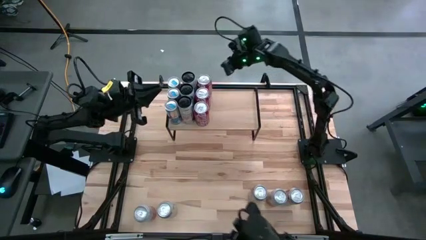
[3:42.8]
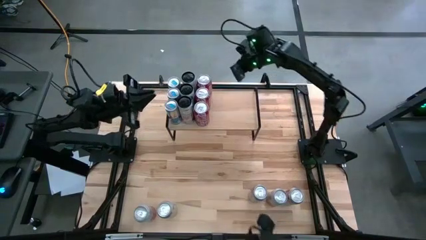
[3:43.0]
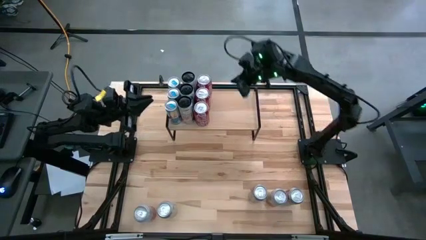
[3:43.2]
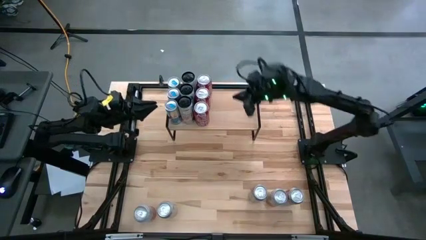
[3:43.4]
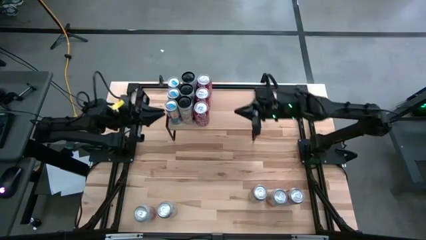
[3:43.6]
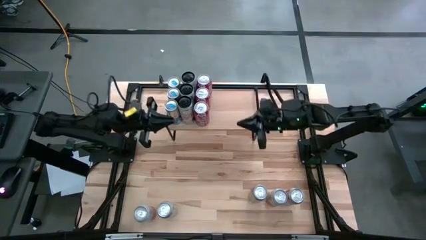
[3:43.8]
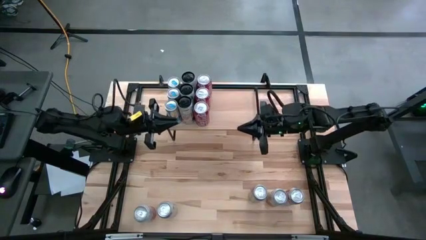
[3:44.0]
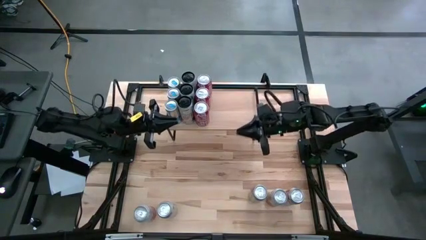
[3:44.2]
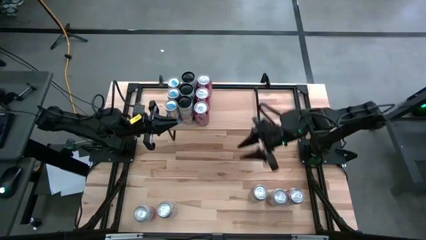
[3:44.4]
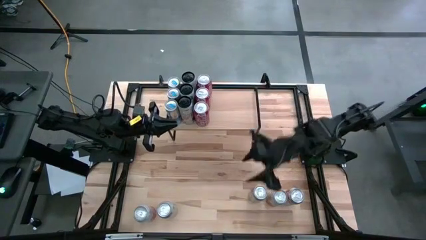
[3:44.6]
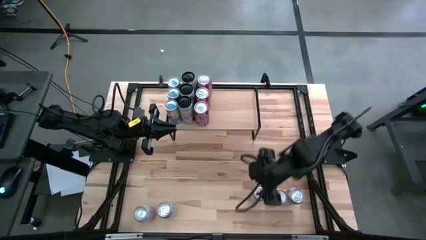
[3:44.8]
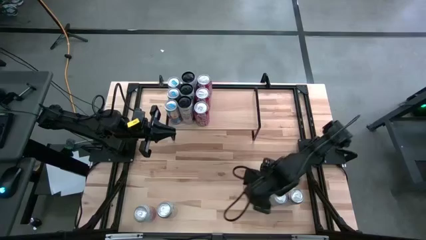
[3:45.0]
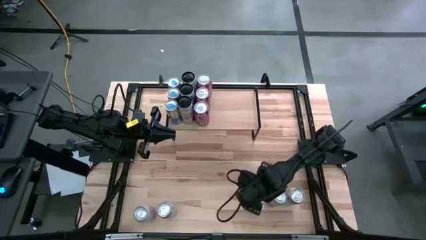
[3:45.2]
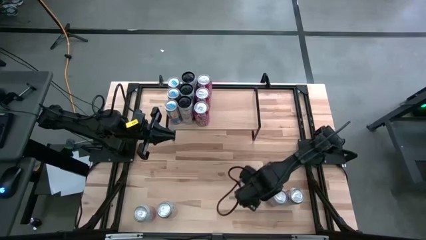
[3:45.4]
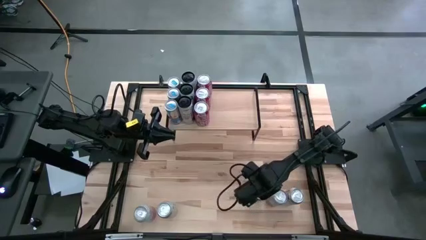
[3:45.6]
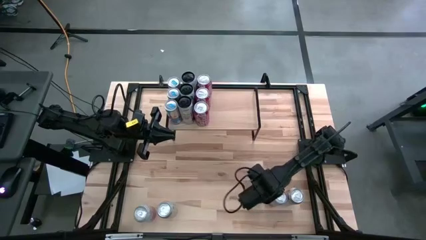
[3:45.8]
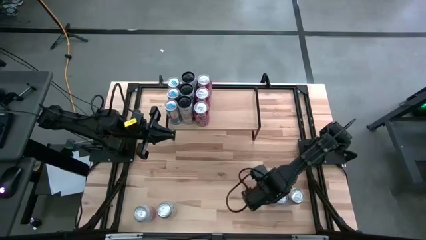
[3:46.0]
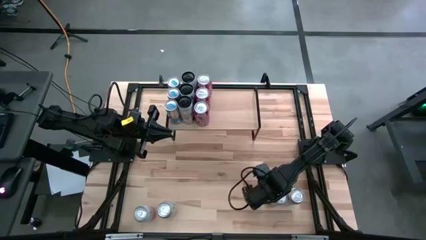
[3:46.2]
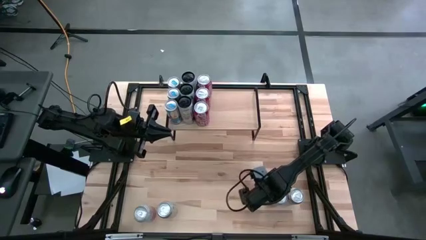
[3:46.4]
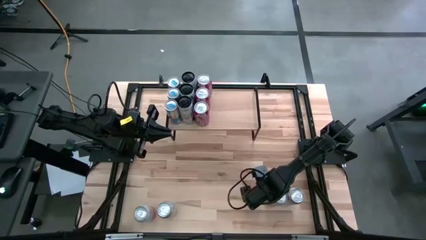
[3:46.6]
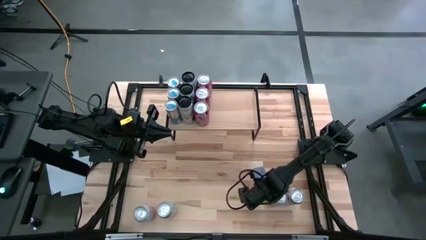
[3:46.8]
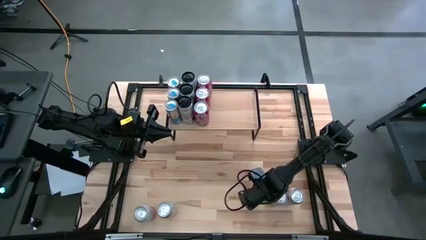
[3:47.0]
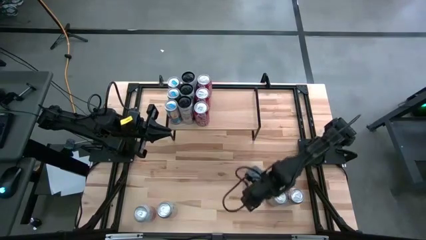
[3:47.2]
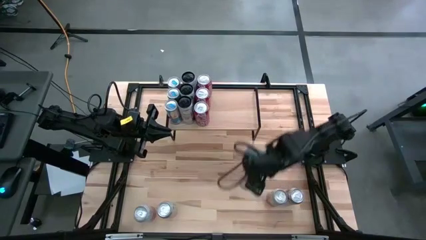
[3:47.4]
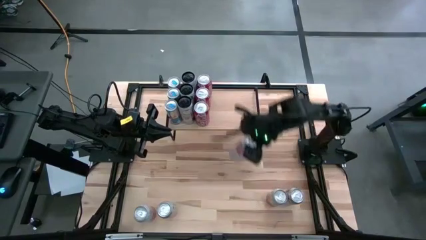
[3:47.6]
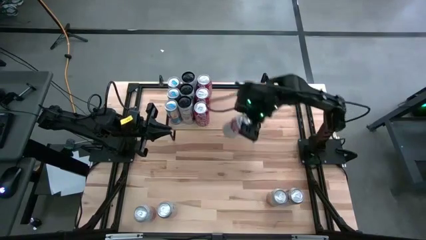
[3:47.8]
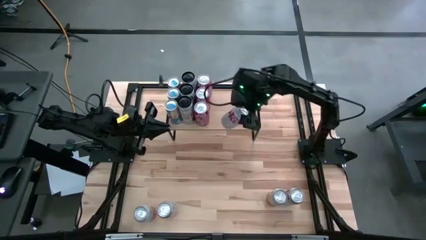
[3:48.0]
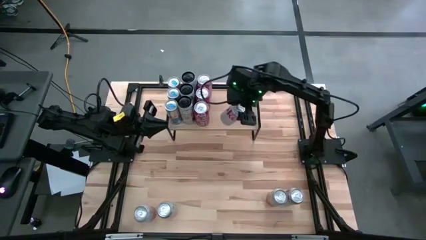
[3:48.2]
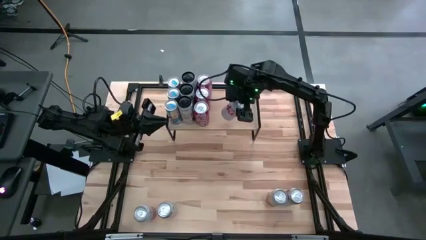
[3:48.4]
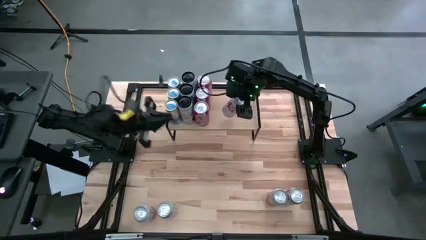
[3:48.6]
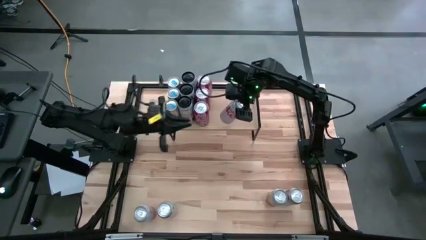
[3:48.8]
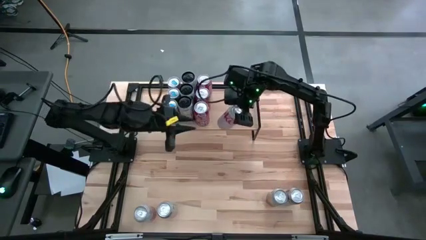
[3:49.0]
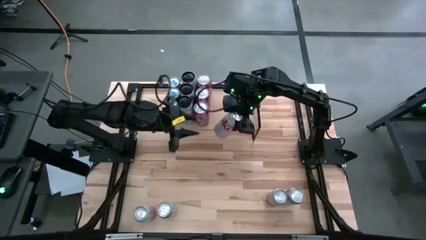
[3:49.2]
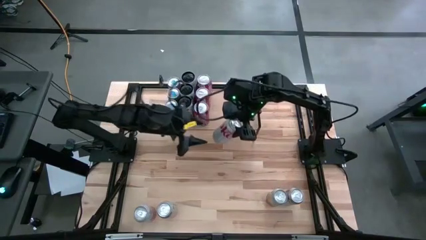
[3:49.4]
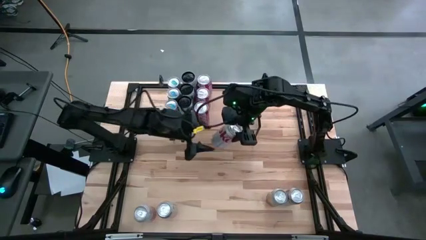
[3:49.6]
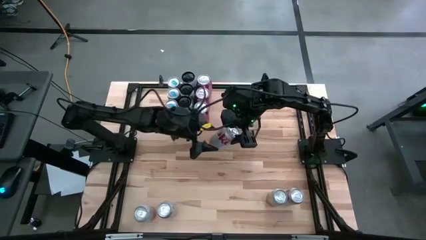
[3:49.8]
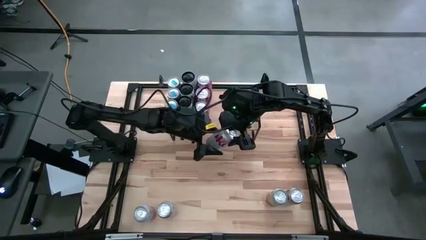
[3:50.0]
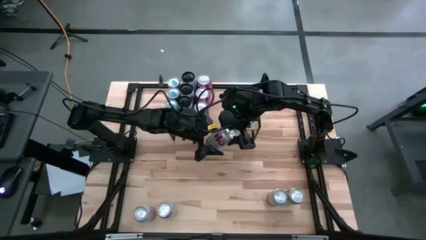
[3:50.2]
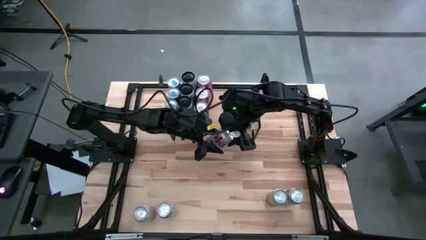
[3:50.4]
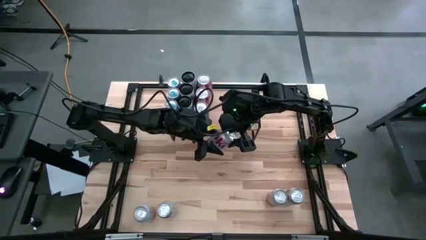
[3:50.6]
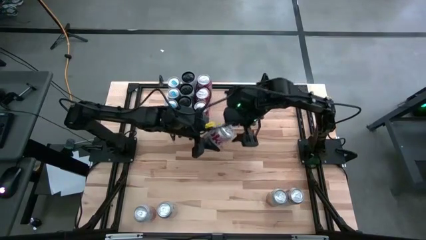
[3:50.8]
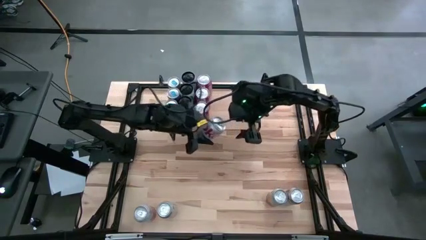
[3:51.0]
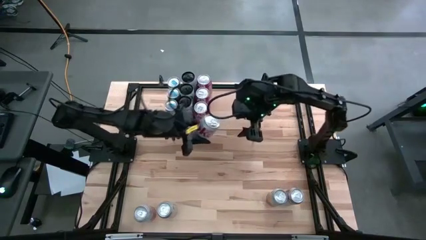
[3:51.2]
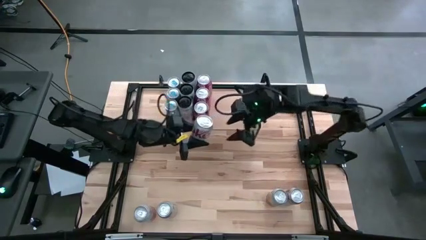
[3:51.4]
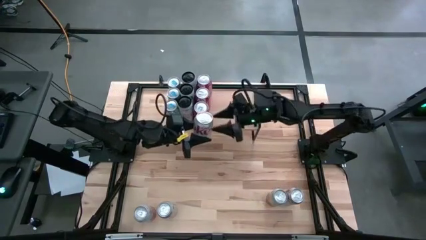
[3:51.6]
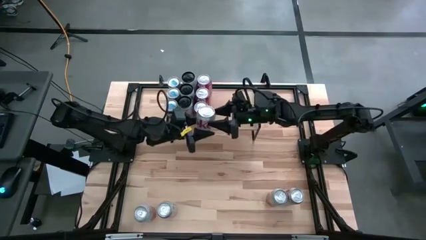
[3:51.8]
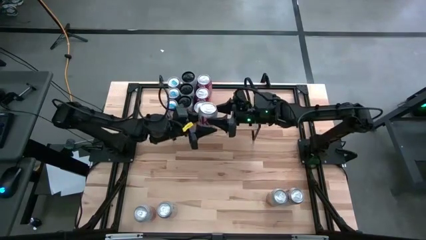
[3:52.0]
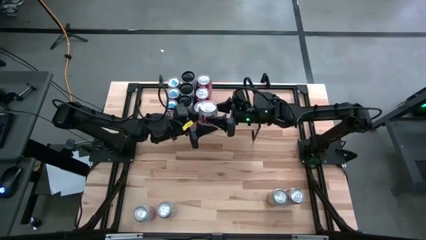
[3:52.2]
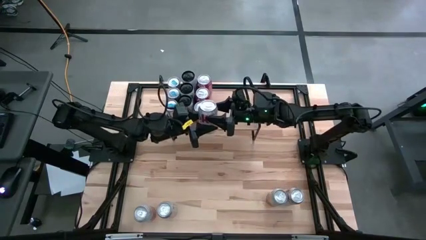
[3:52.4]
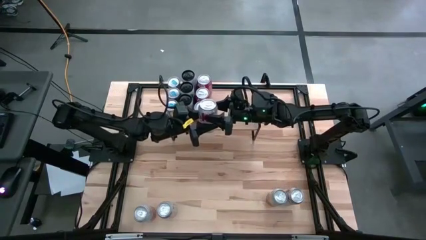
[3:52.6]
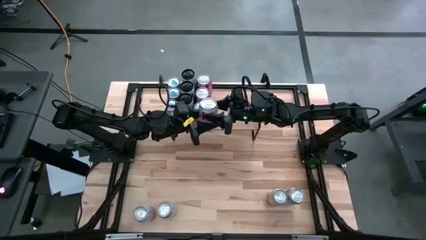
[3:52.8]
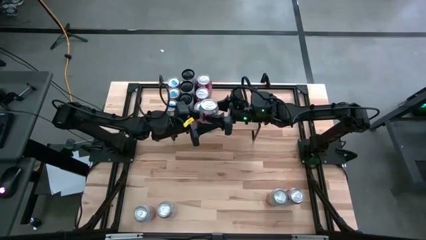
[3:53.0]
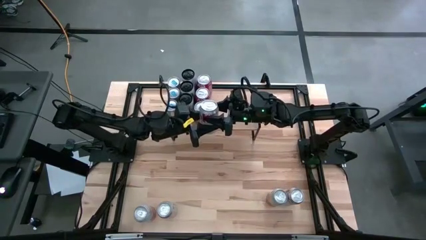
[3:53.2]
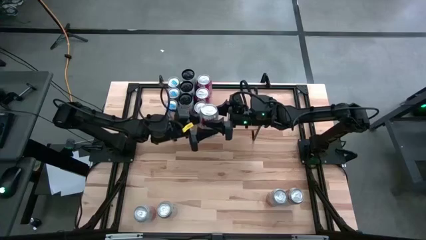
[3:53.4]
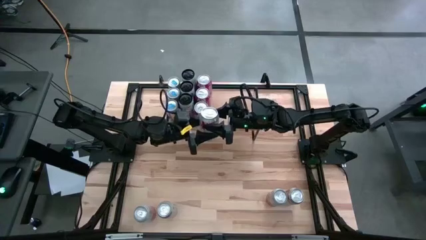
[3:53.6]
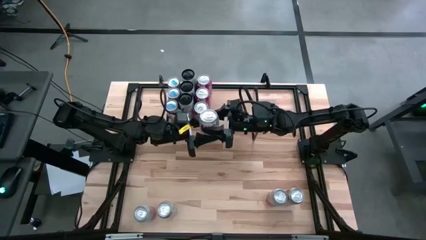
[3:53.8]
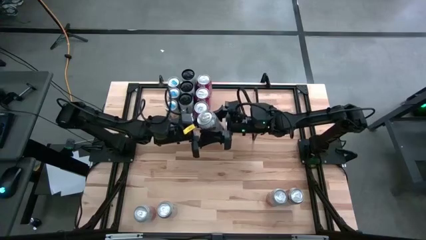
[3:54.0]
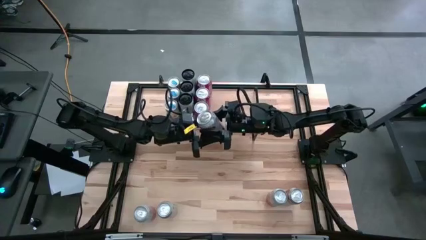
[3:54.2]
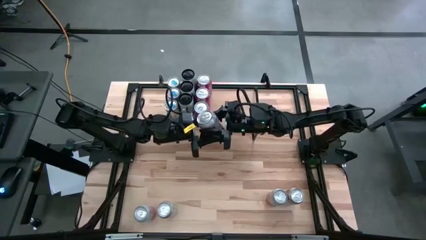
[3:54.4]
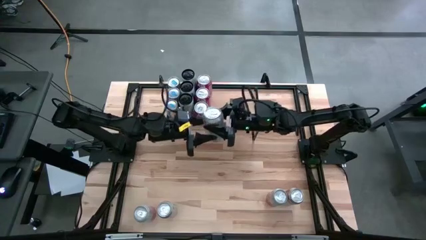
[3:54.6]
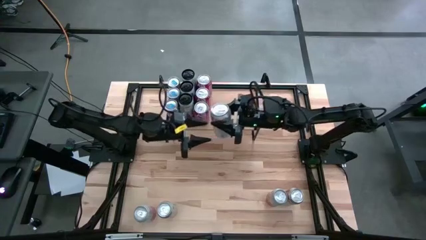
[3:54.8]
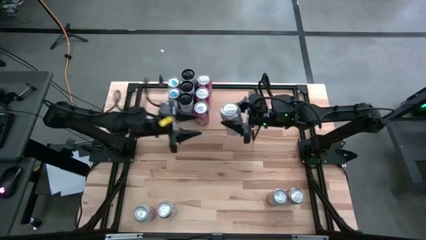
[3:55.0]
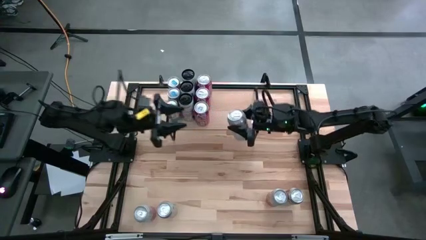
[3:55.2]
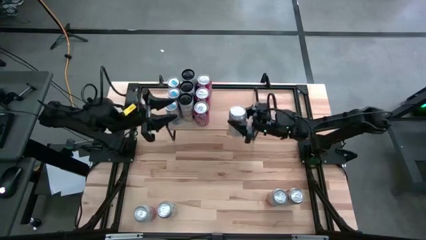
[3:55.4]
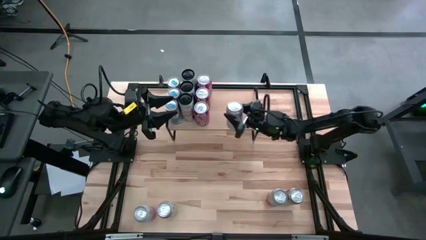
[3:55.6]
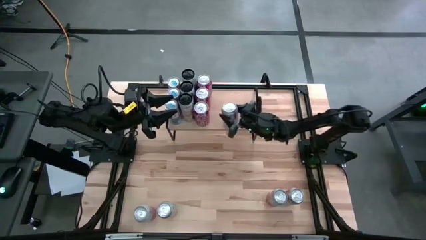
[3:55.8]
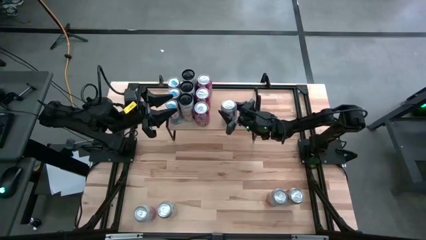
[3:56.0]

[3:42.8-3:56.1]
Task: Place canned beverage on shelf
Put the middle red-silver soda can on the shelf

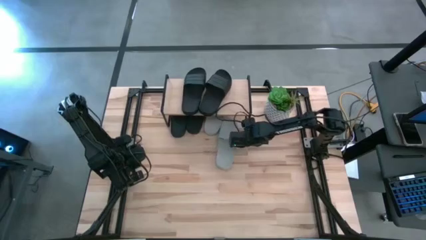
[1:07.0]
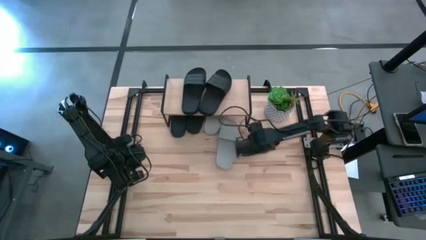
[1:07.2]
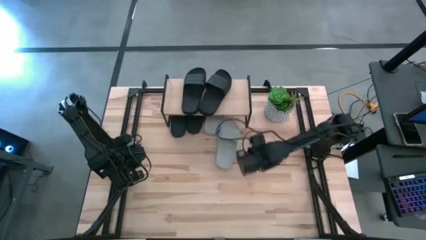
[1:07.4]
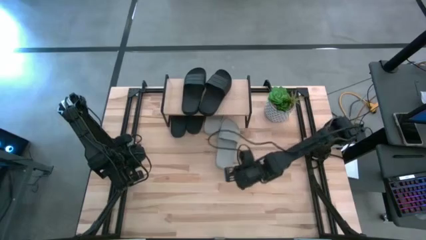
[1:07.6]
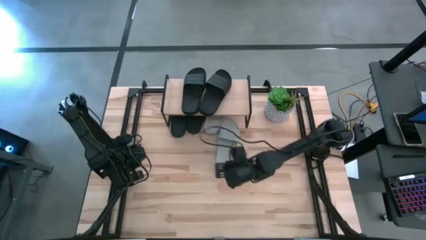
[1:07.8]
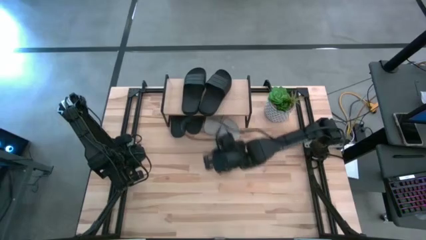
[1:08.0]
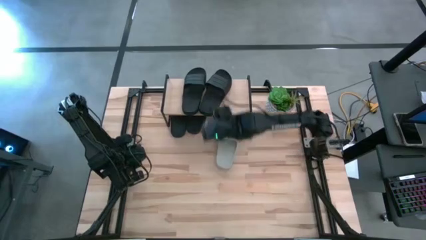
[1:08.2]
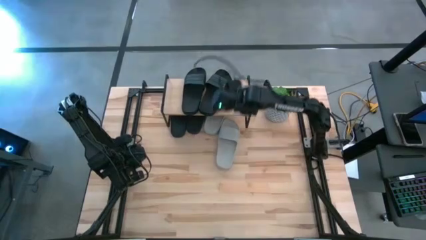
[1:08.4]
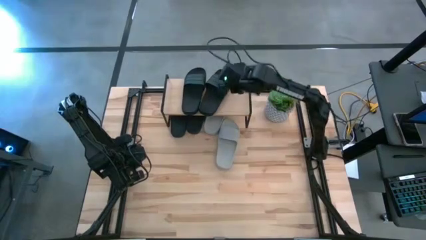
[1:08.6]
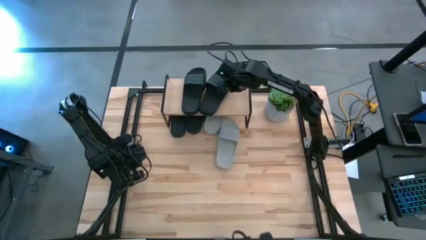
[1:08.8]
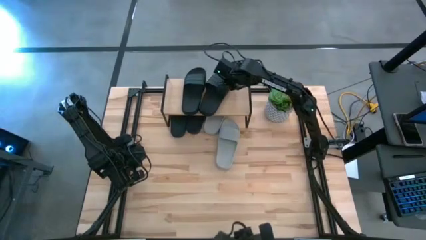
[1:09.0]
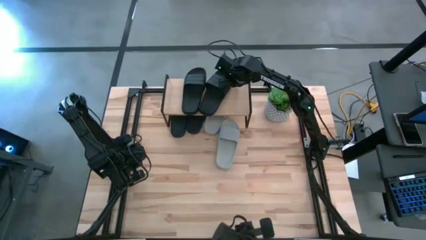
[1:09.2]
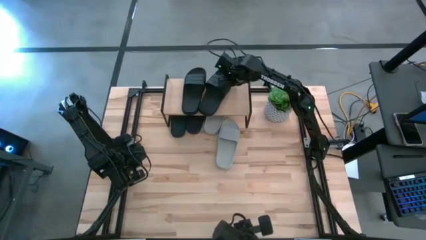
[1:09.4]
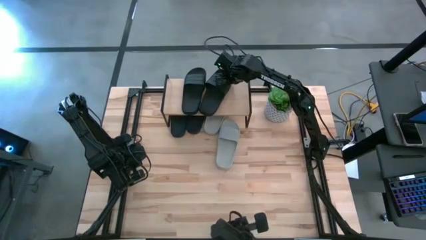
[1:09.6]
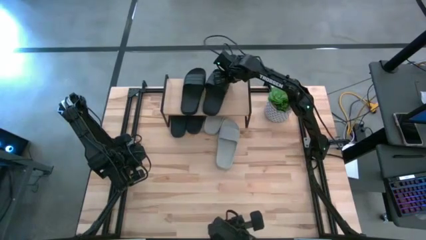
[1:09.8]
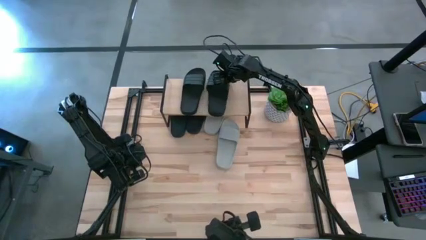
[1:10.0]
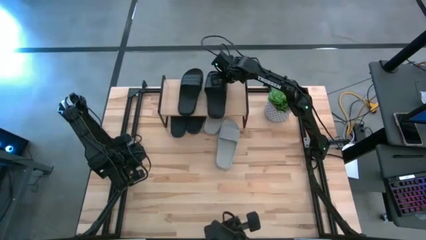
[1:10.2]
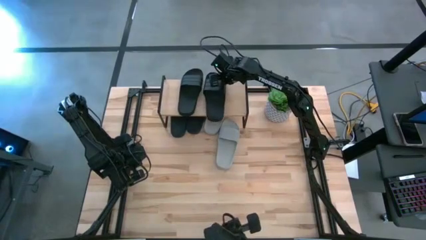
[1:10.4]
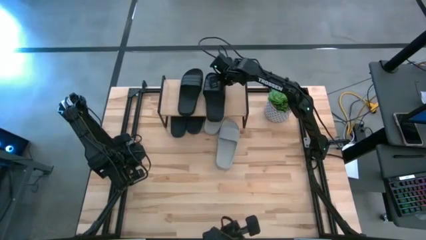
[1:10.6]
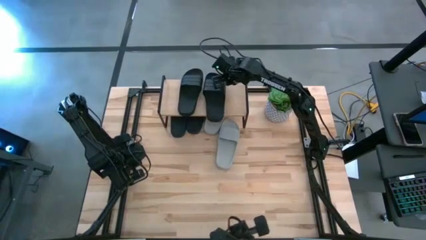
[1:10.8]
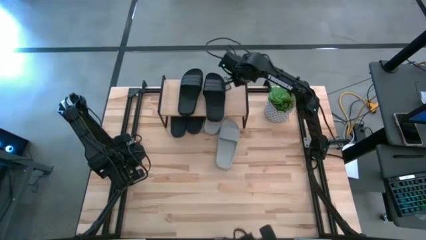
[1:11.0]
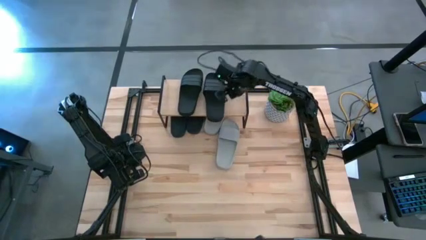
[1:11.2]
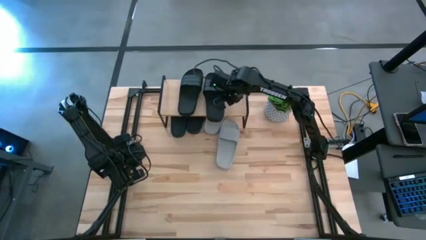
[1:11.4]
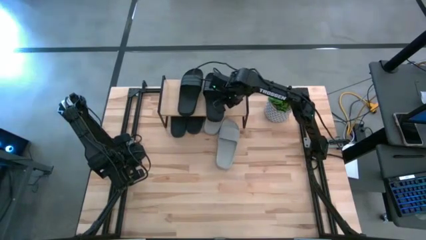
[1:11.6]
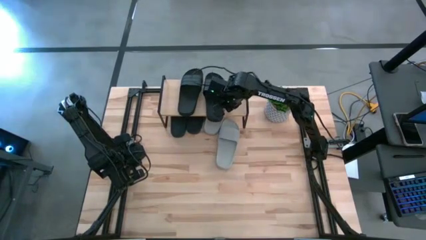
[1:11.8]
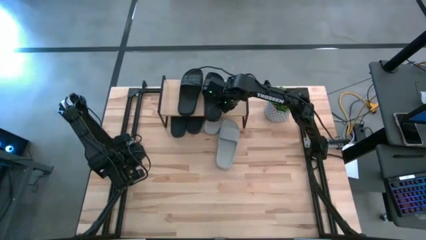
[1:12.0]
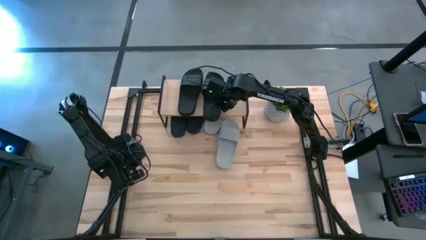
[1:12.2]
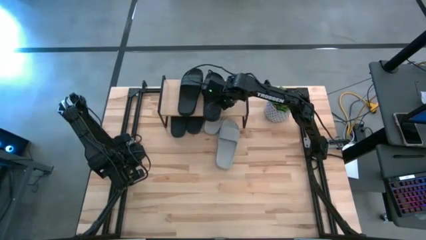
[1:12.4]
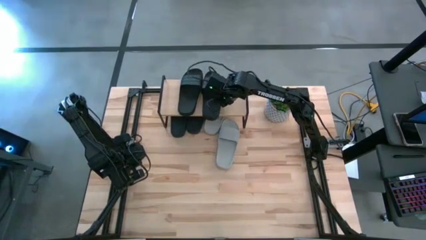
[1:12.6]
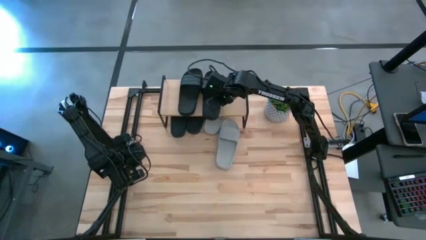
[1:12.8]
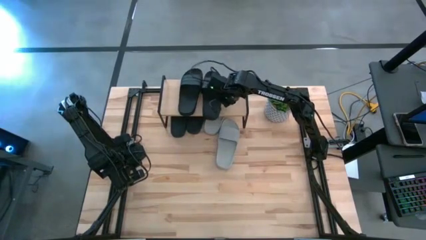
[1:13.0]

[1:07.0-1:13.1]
Task: Pick and place slides into the shelf
Adjust the black slide on the shelf
